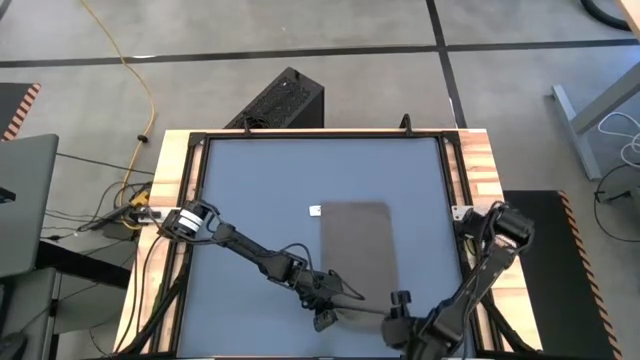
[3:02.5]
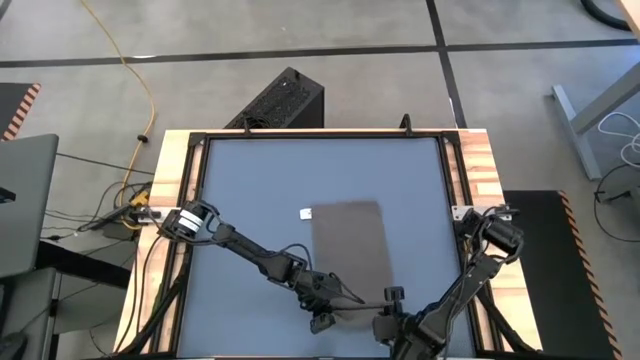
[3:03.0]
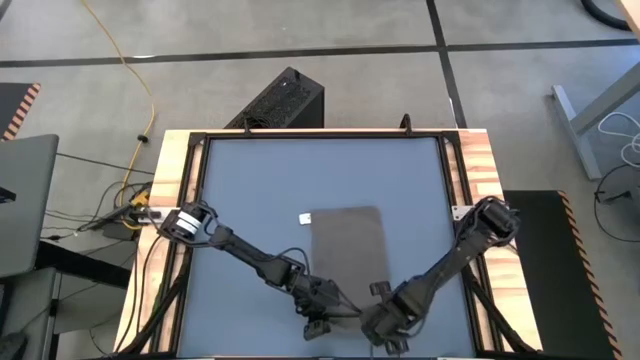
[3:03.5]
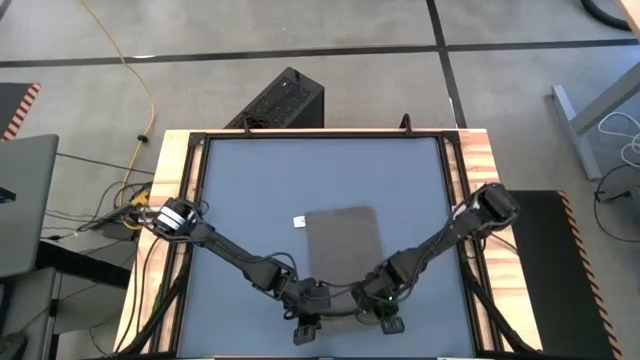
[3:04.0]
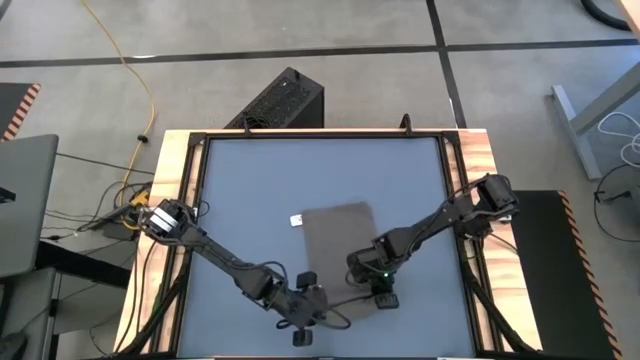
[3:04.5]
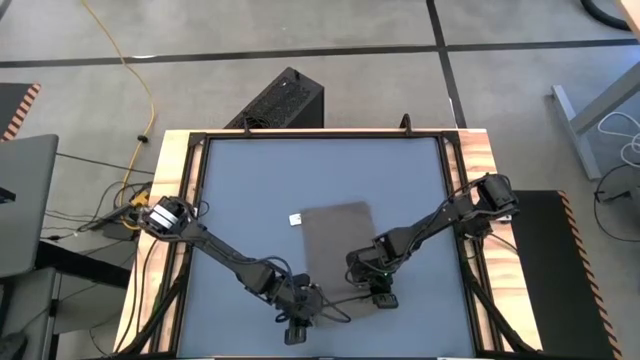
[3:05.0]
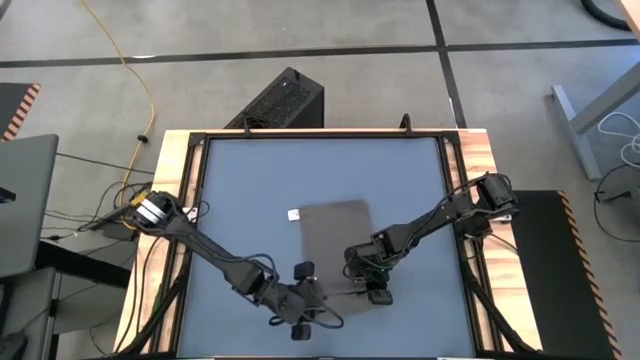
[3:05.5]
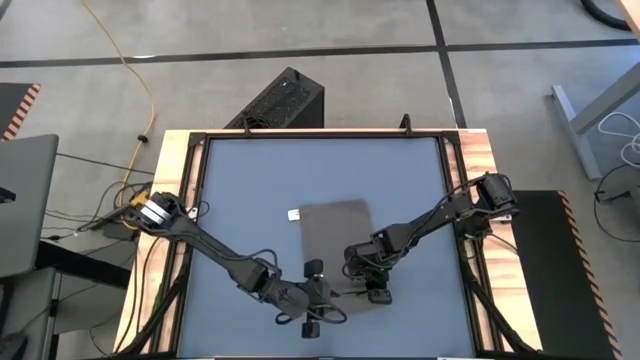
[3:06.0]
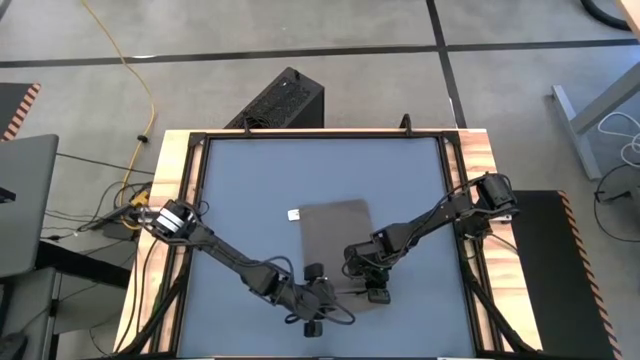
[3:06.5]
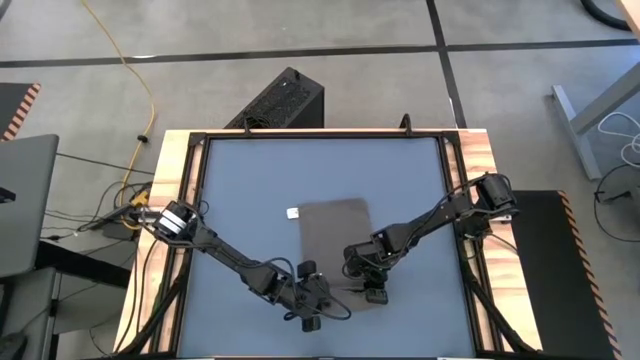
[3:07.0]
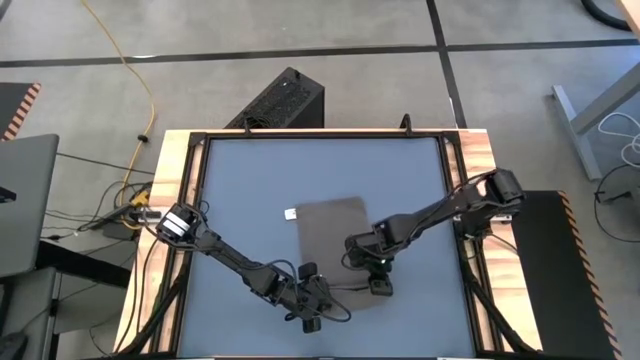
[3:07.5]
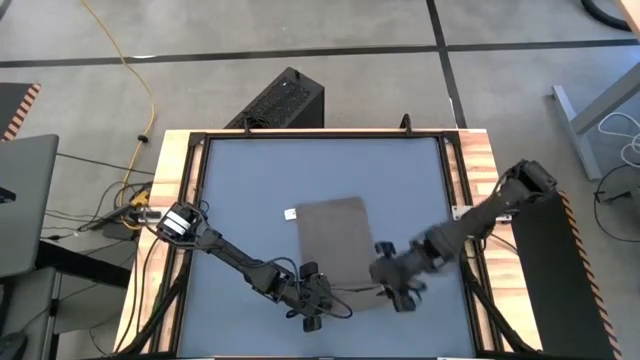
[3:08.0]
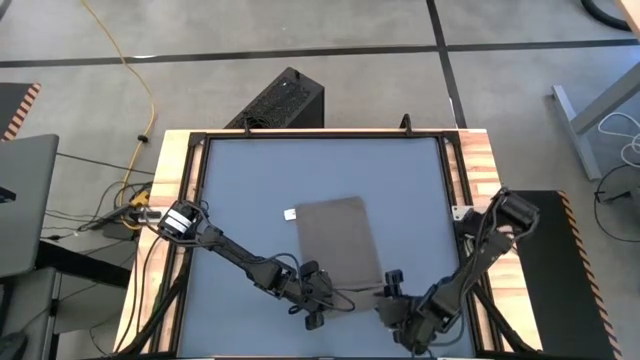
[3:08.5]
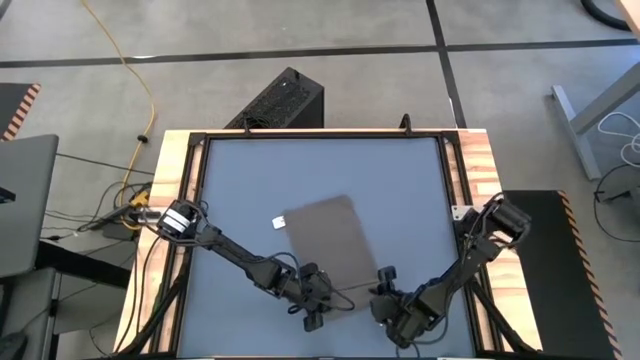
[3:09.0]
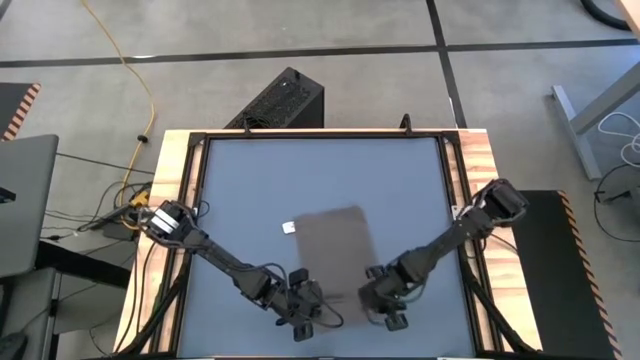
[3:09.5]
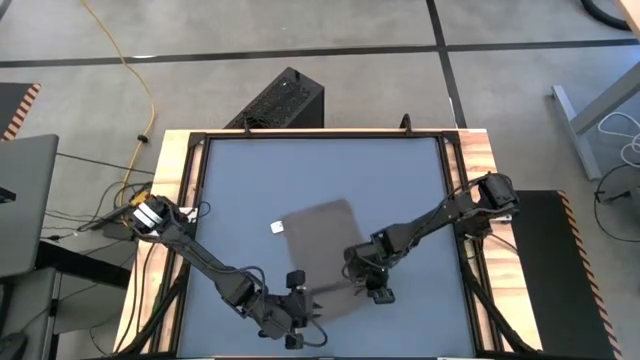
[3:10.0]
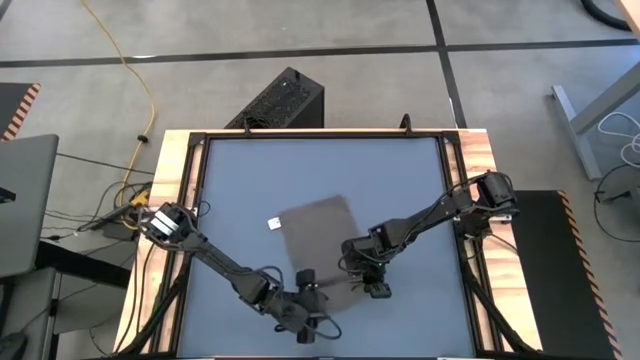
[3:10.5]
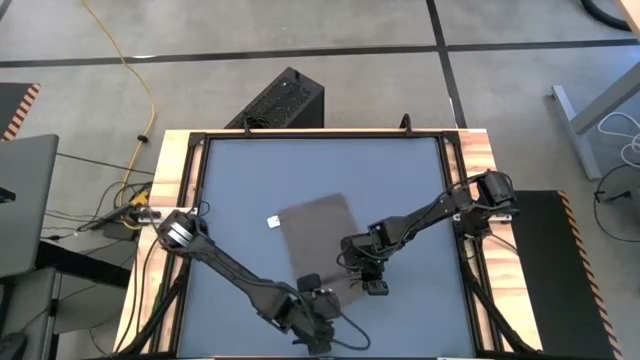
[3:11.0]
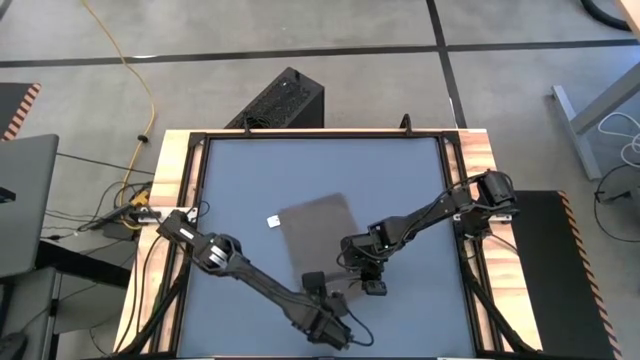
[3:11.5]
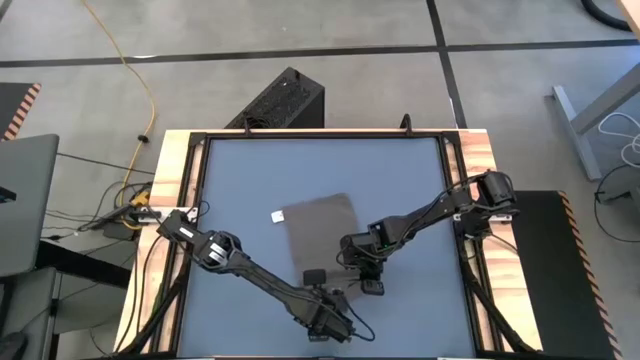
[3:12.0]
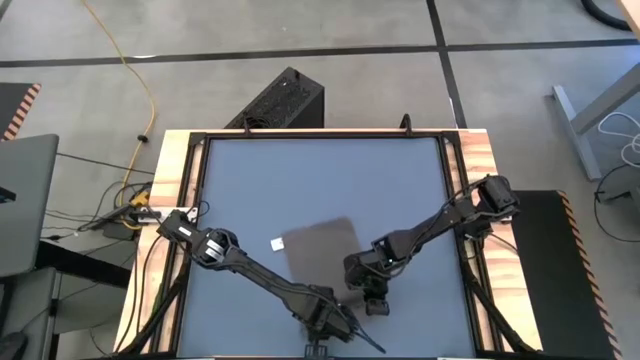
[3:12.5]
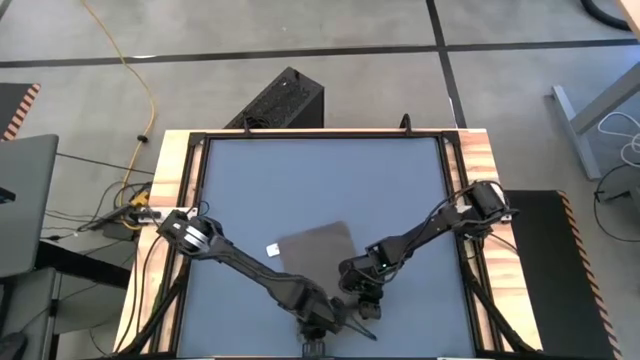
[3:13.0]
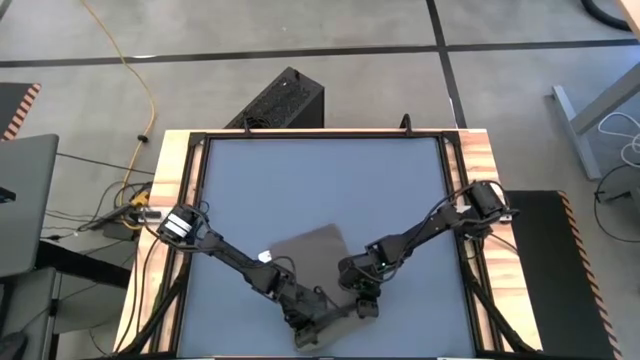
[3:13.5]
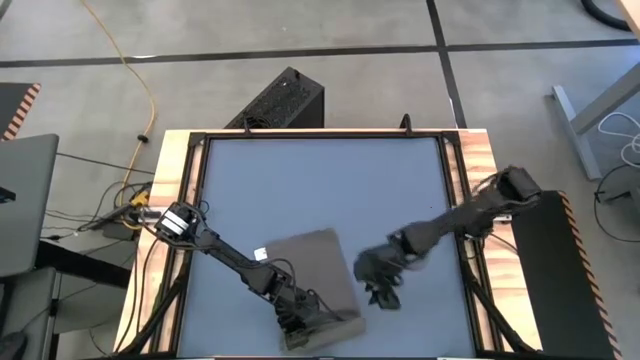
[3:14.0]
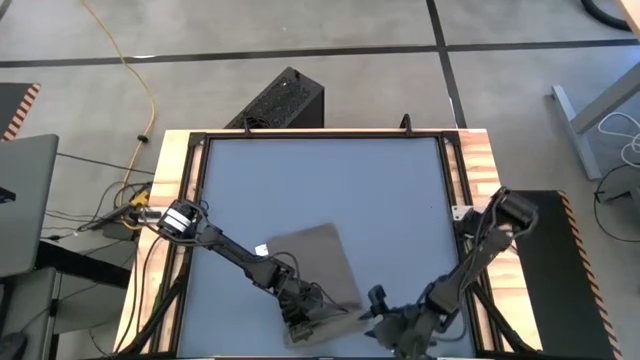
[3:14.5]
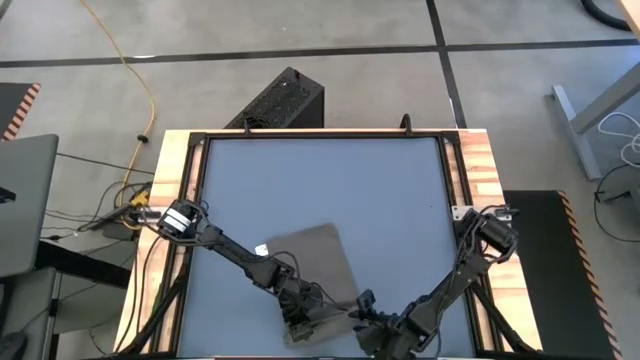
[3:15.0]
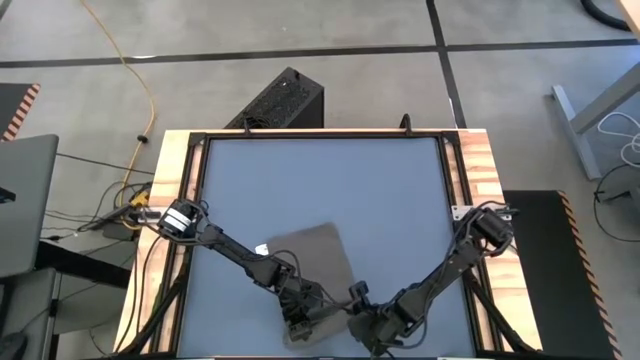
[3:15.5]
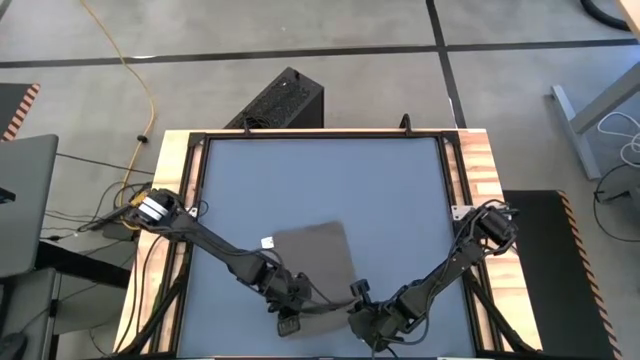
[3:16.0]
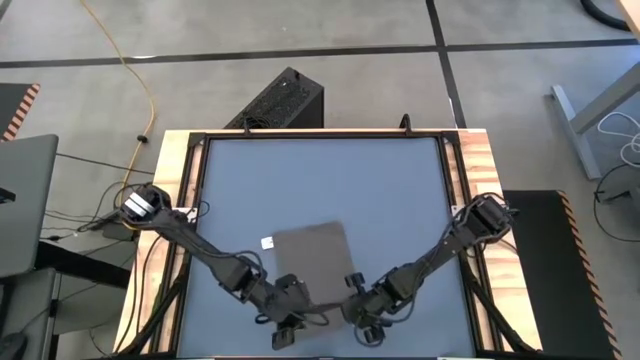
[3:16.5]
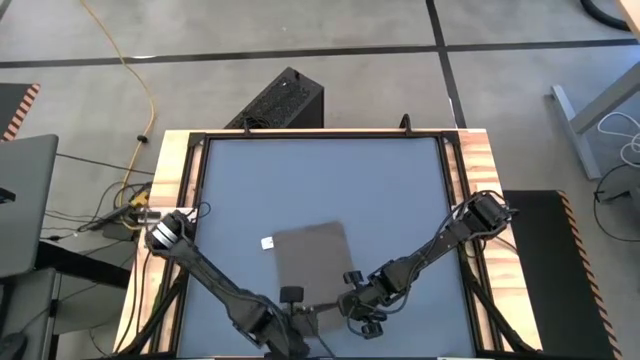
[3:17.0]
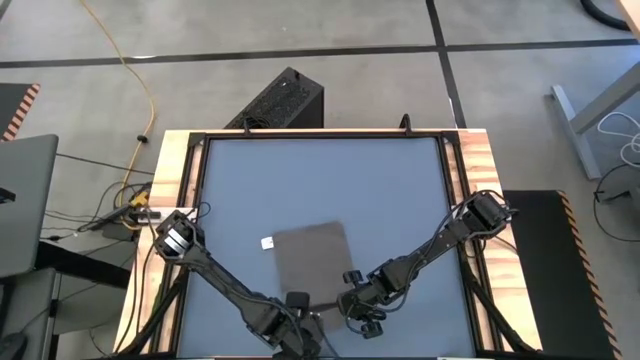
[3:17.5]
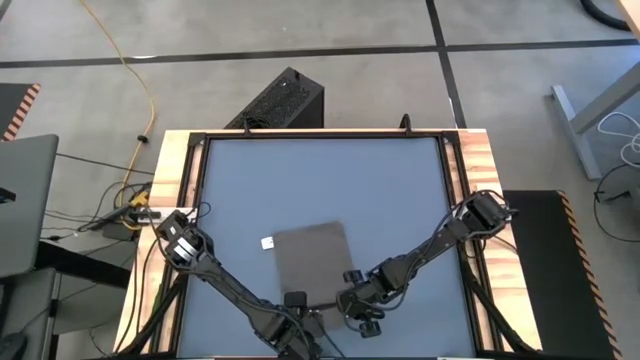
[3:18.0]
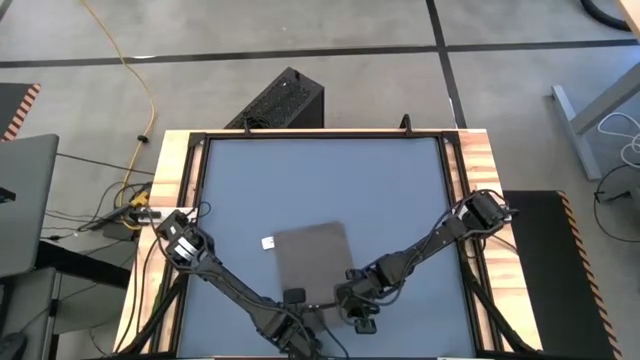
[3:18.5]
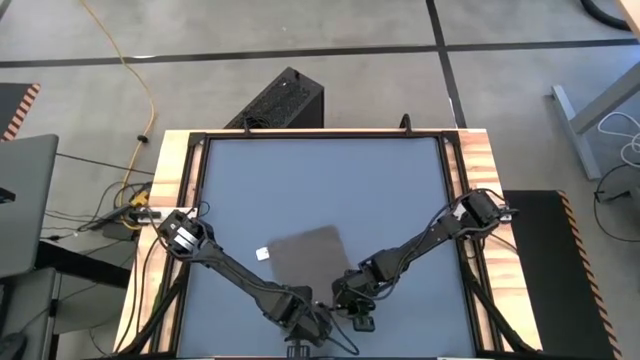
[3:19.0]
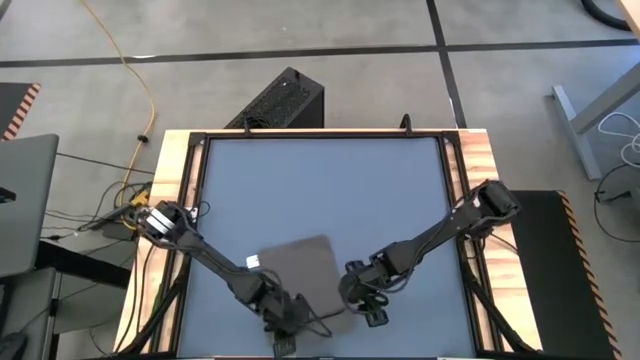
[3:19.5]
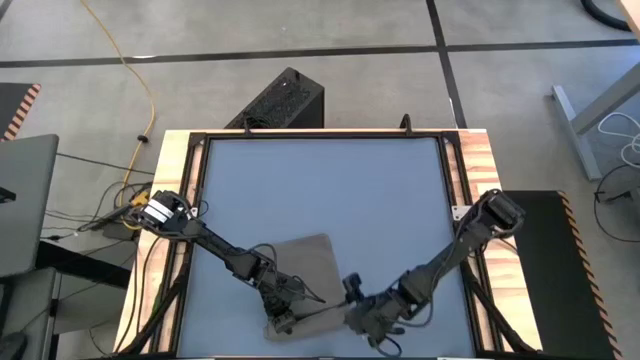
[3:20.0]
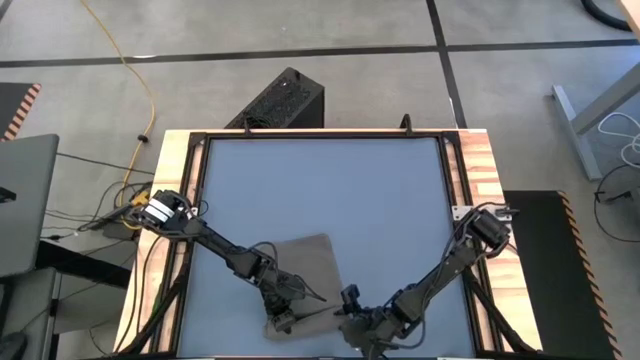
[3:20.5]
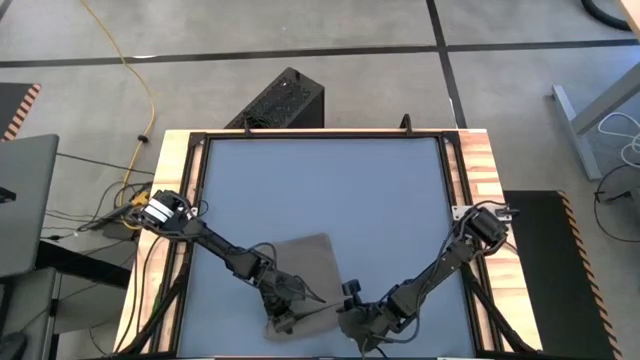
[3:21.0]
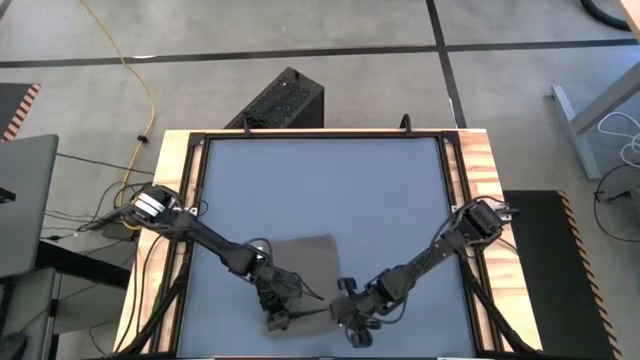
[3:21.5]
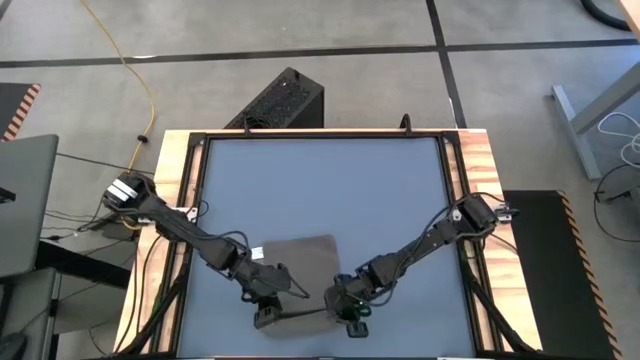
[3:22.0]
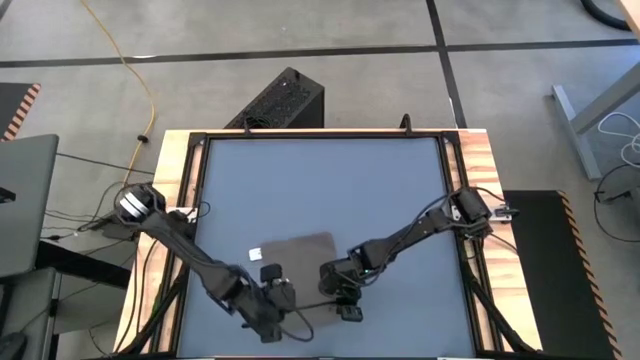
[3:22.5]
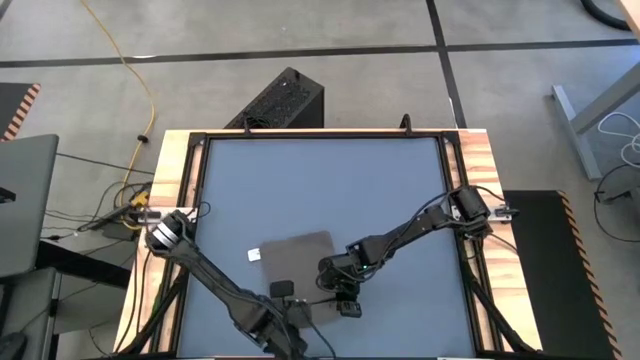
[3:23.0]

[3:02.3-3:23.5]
Task: Roll towel into tight, uniform cylinder
Roll the gray towel

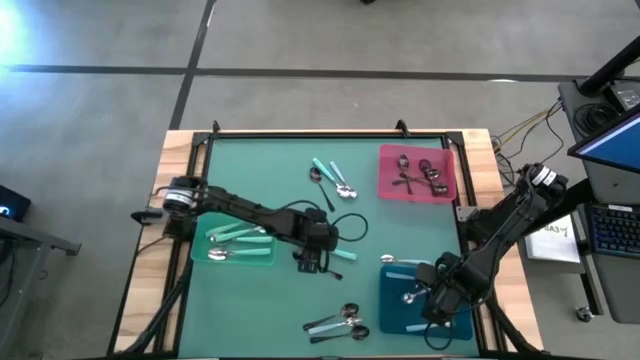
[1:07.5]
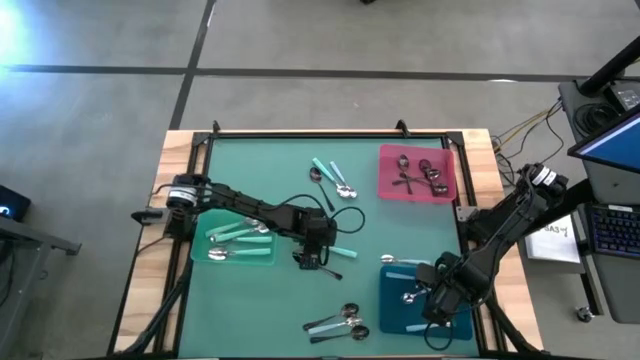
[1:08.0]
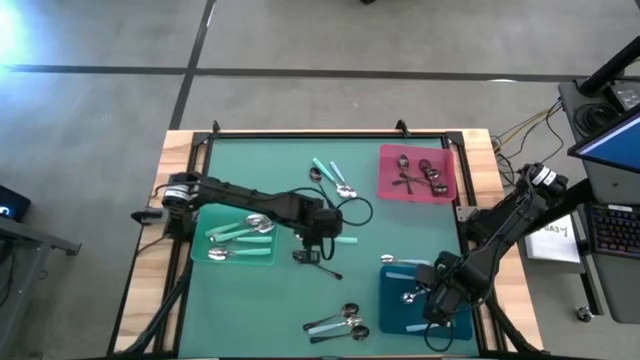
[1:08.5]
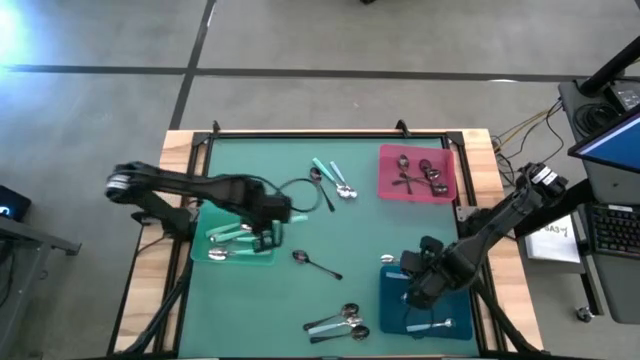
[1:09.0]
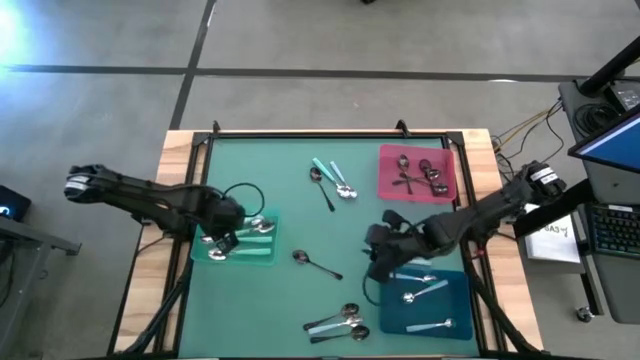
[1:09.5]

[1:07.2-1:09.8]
Task: Sort silverware by color (type)
Put the green spoon into the green bin
